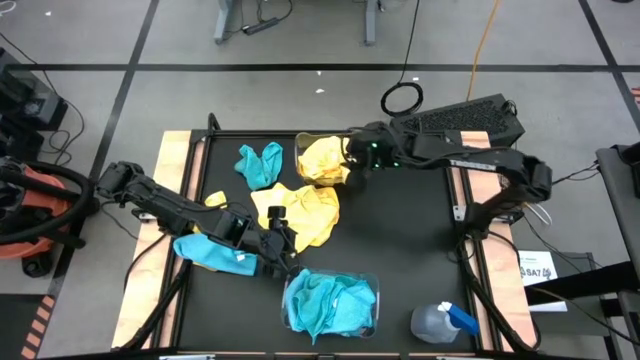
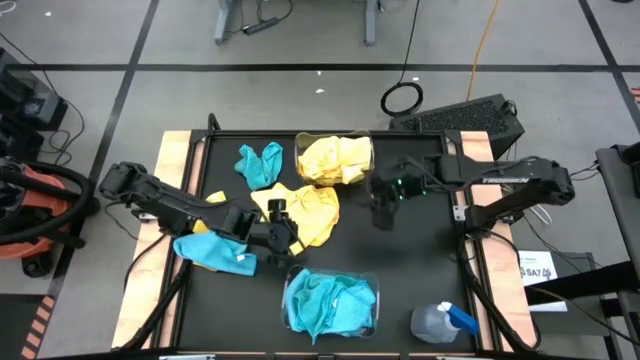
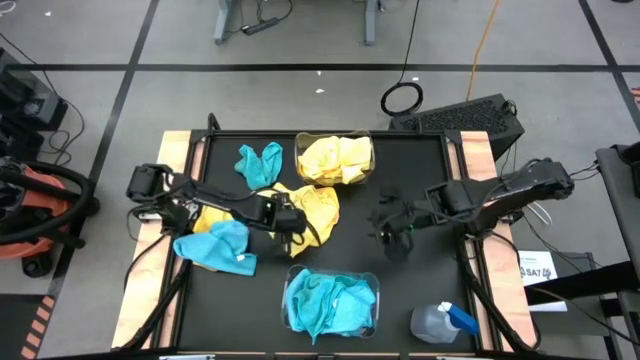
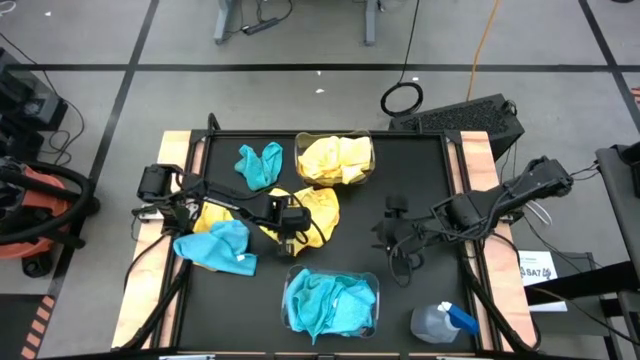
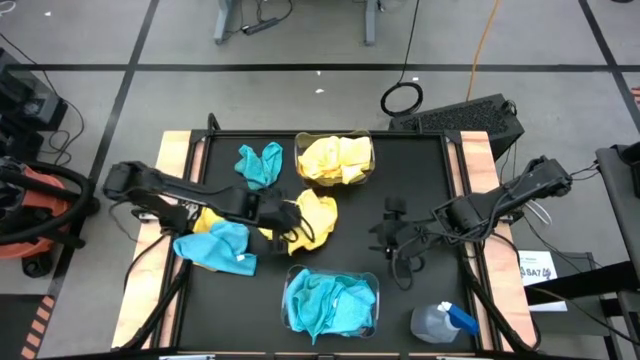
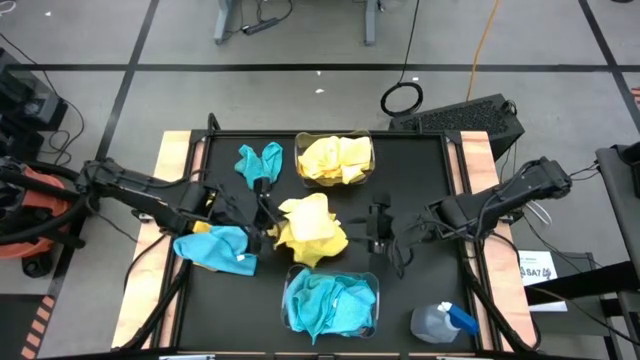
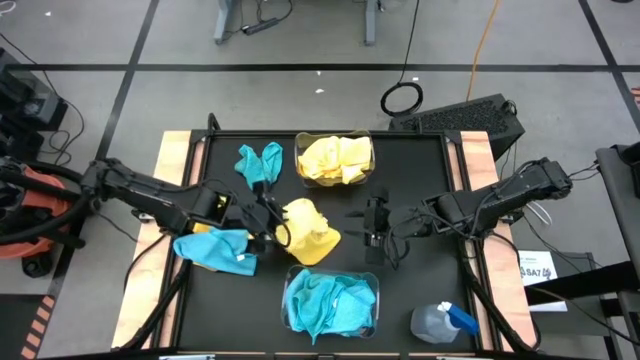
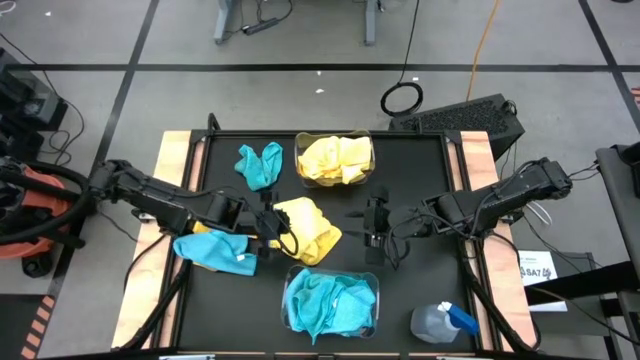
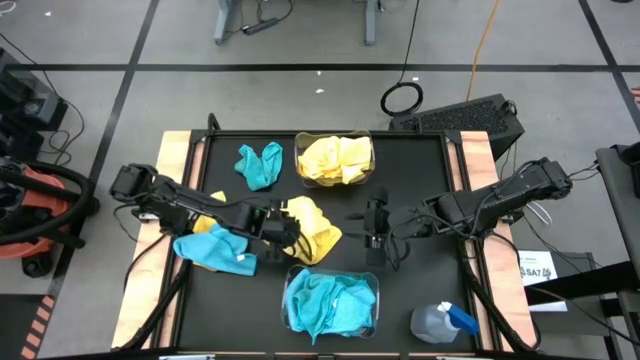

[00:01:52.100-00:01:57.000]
Task: Sort microfiber towel by color & place in baskets
Put the yellow towel into the top transparent bin

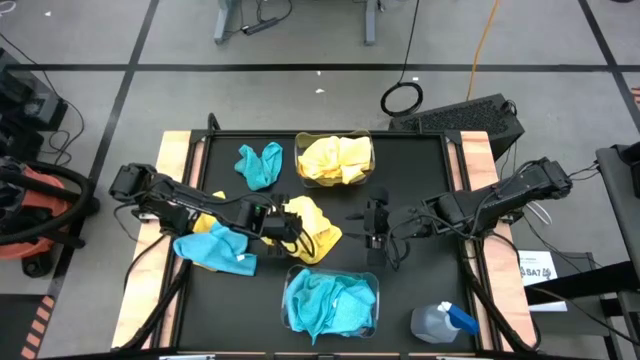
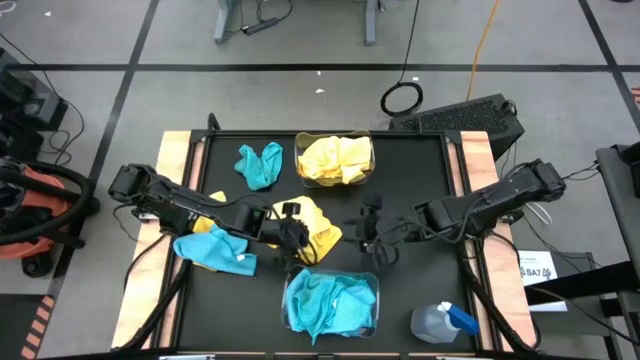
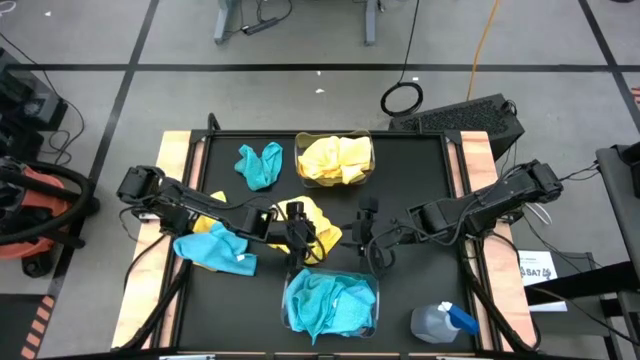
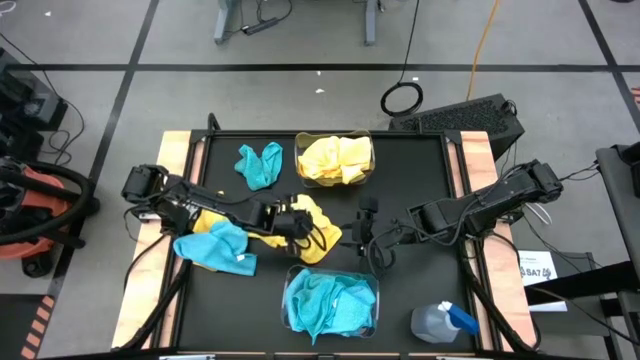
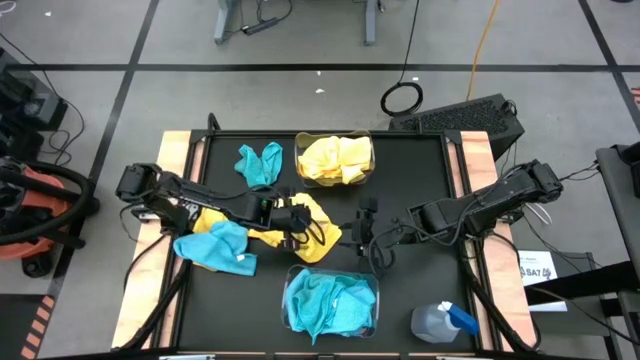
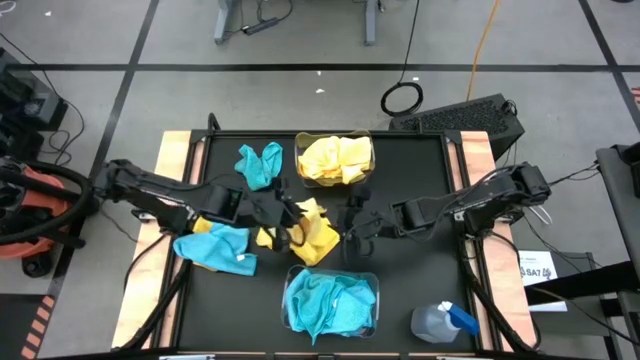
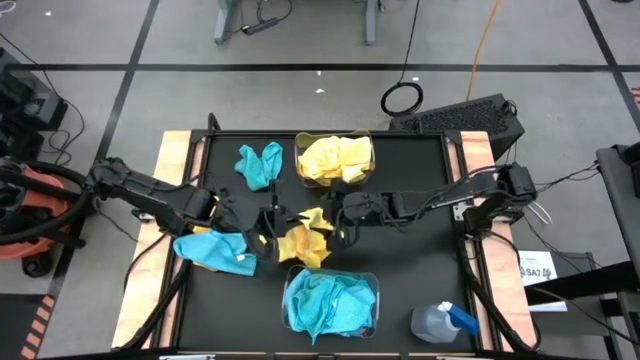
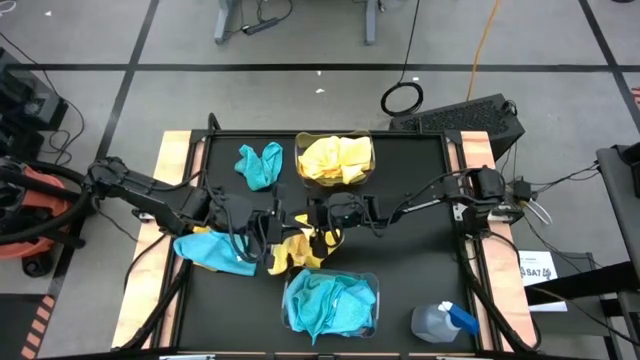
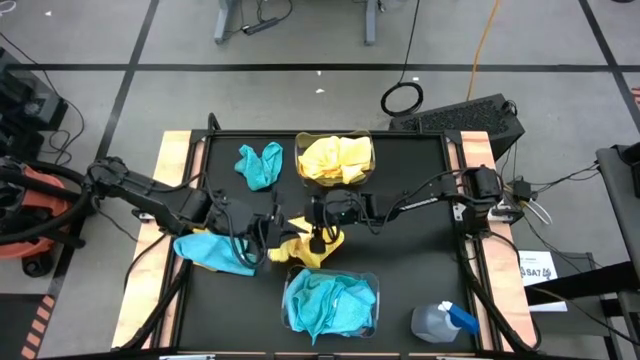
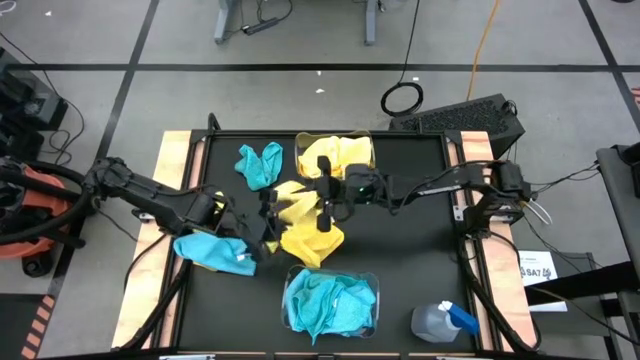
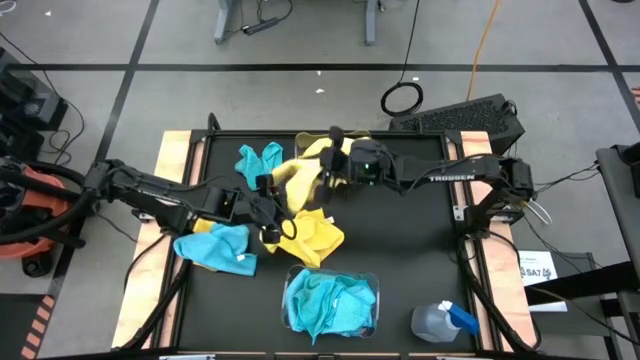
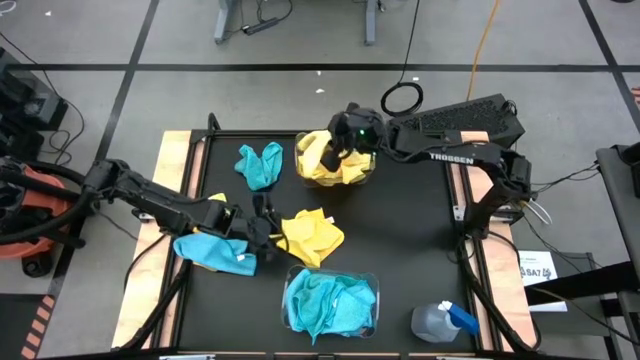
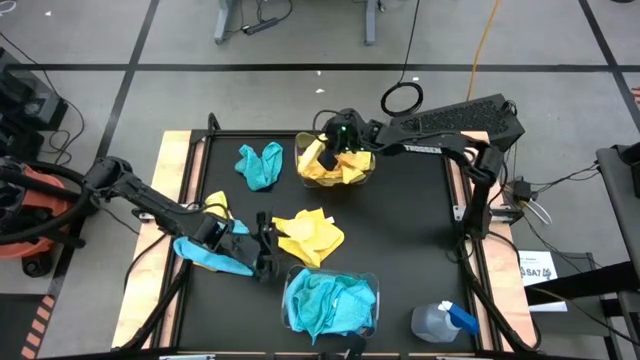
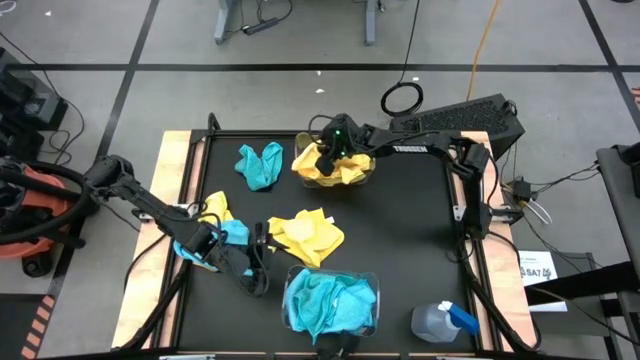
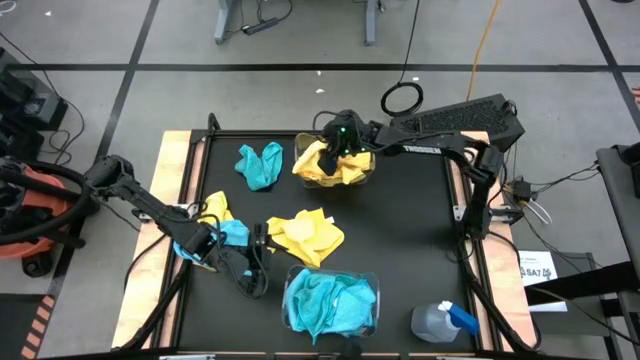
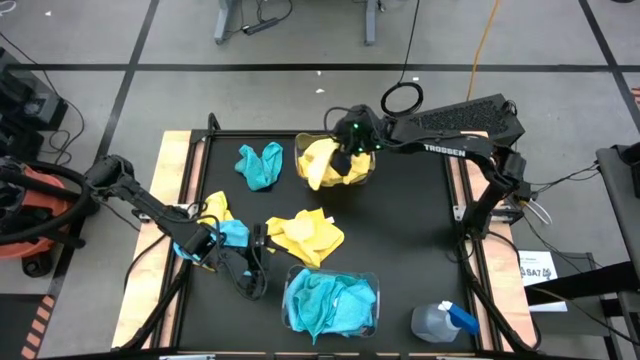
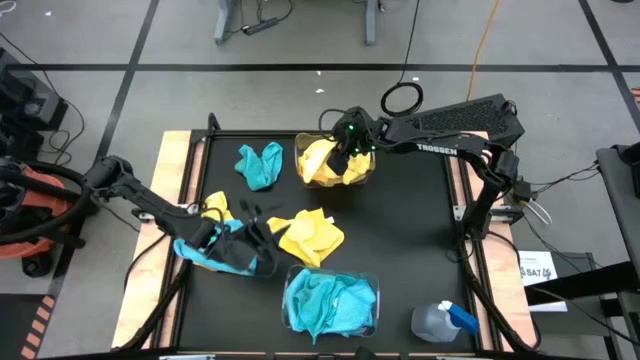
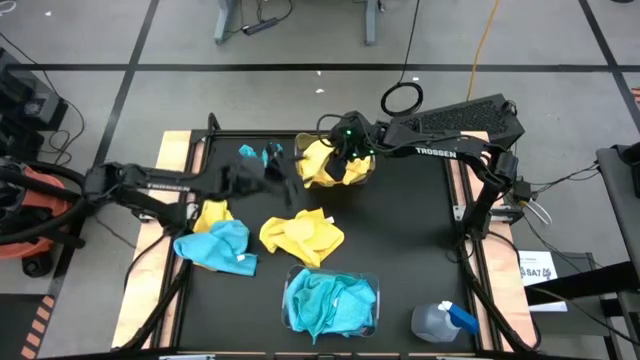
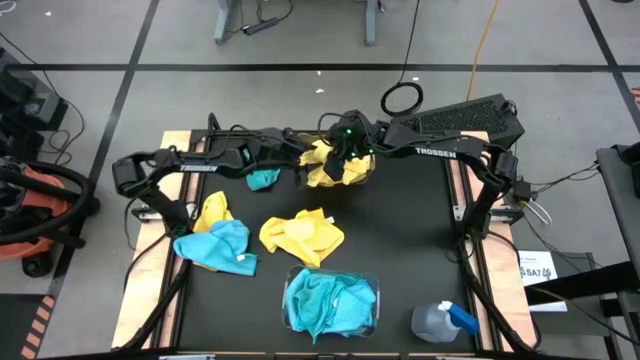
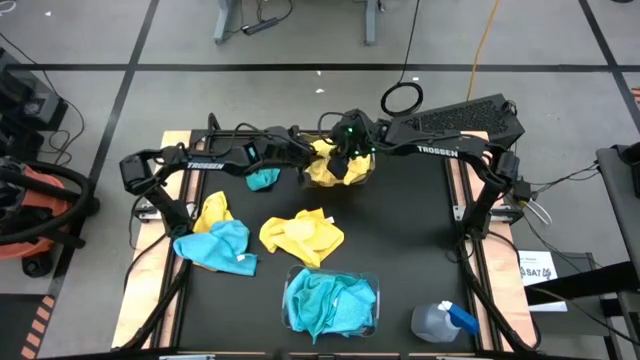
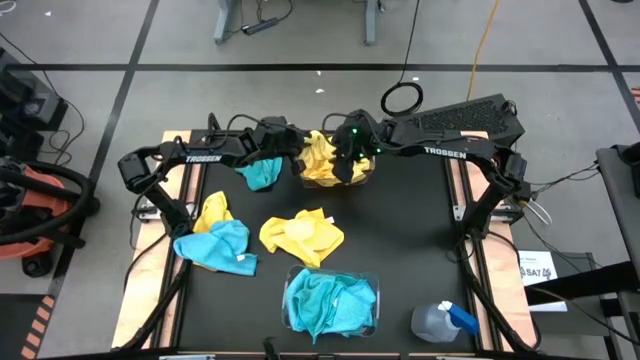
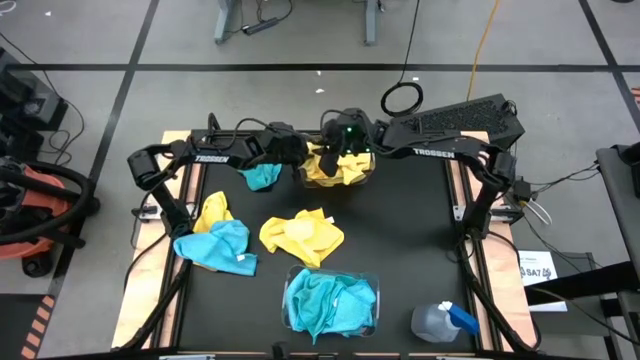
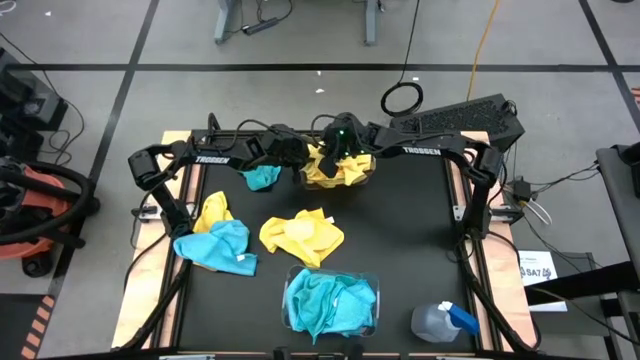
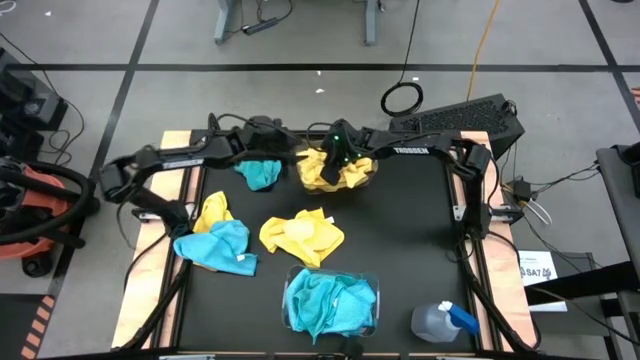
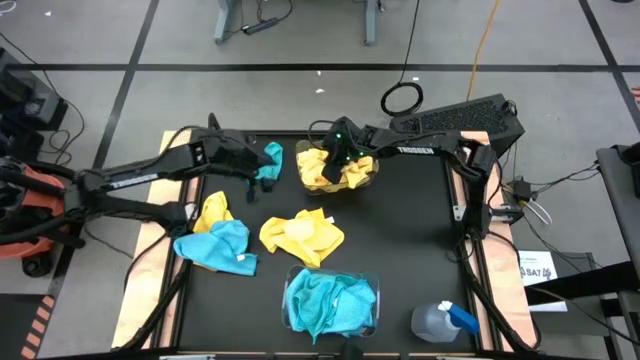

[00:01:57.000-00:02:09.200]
Put the yellow towel into the top transparent bin

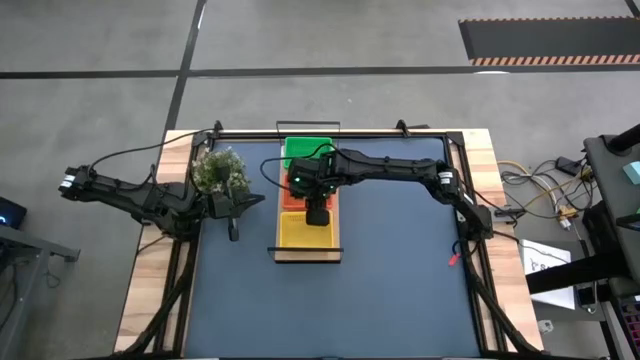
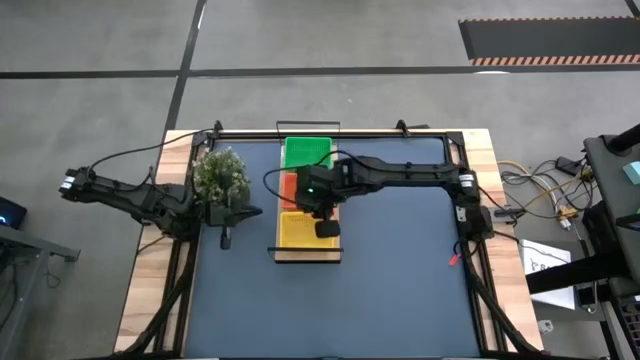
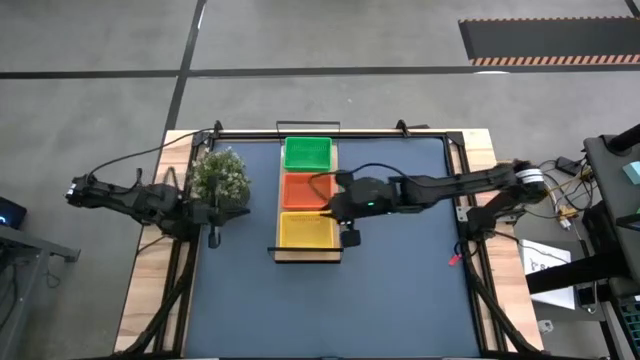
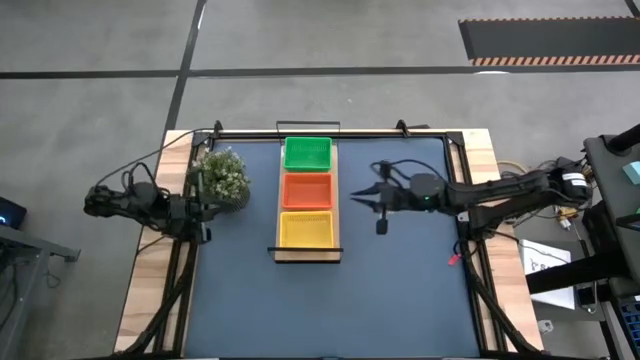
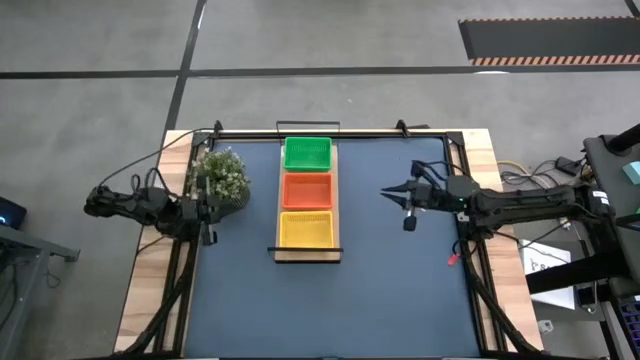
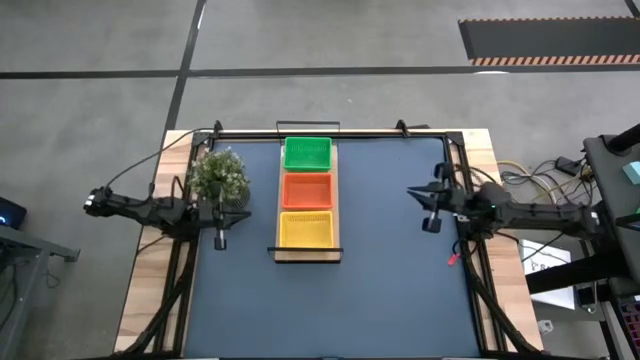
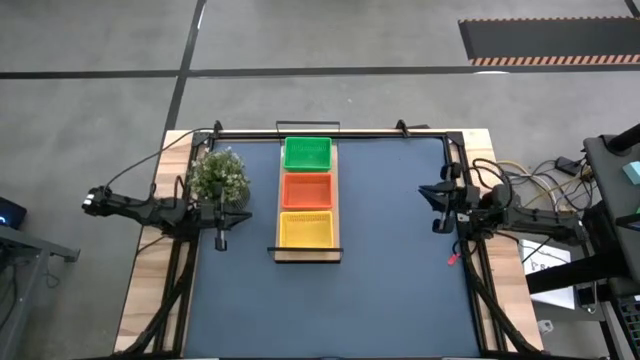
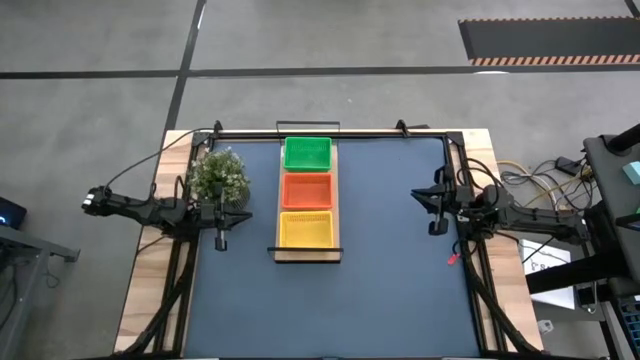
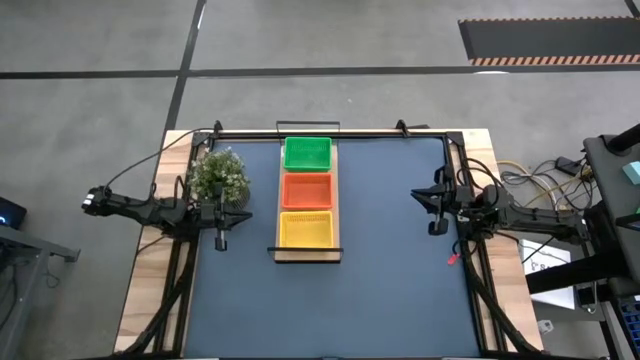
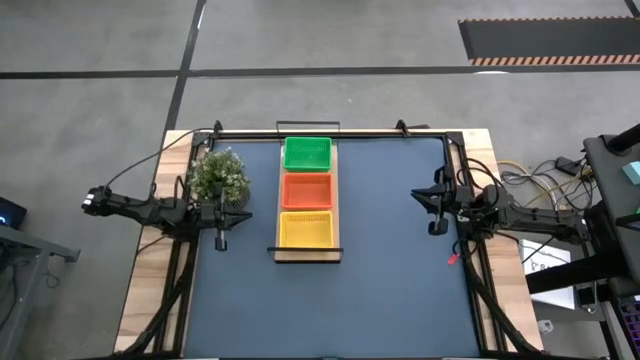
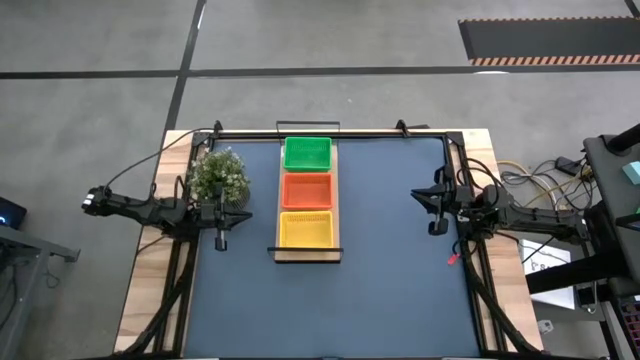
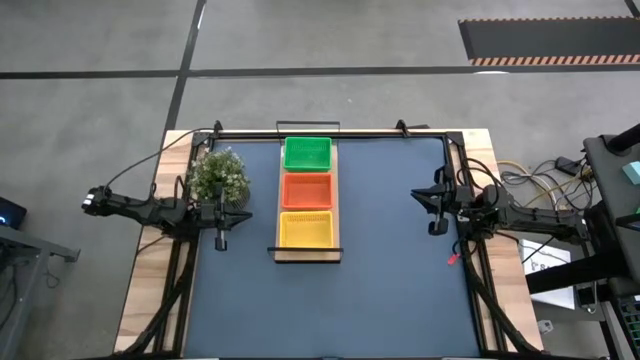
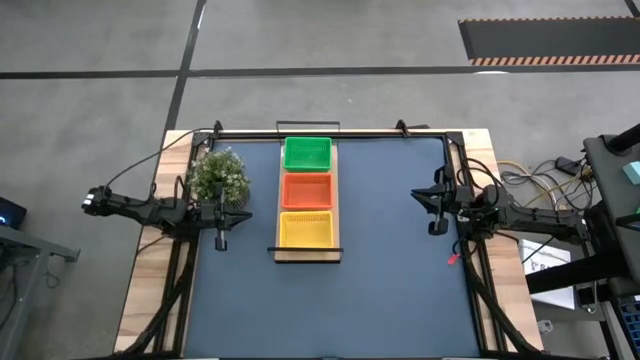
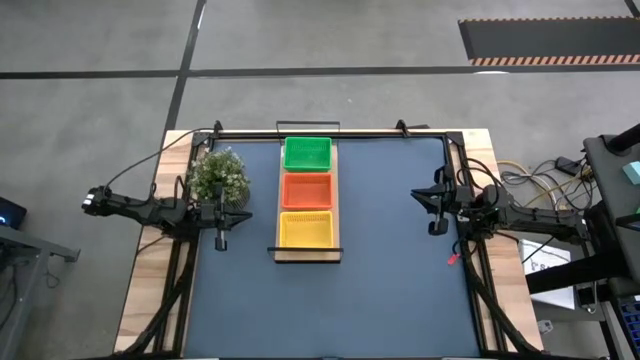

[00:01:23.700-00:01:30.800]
Task: Stack baskets on shelf by color
Return to Home Position
